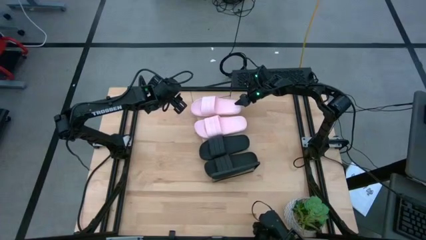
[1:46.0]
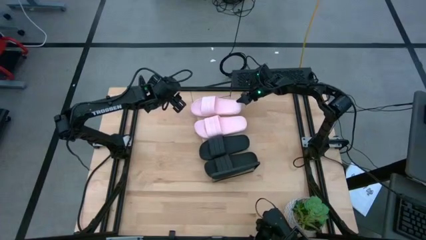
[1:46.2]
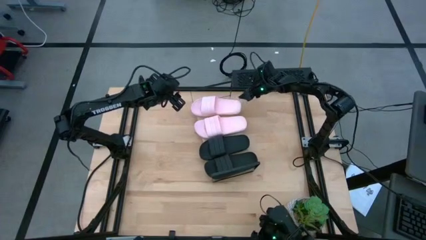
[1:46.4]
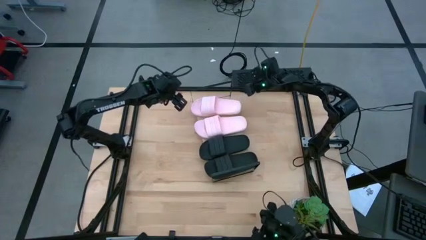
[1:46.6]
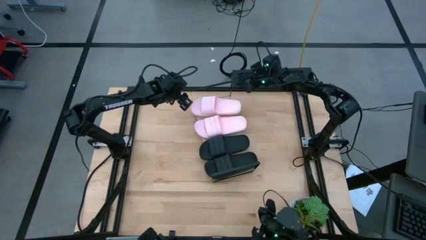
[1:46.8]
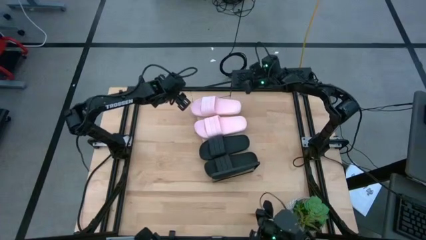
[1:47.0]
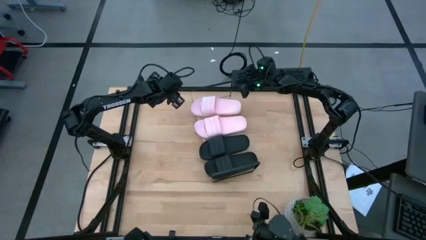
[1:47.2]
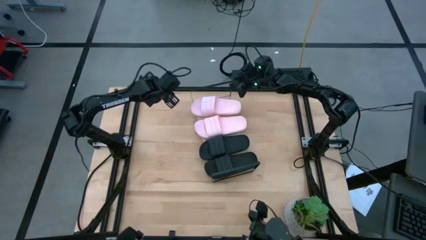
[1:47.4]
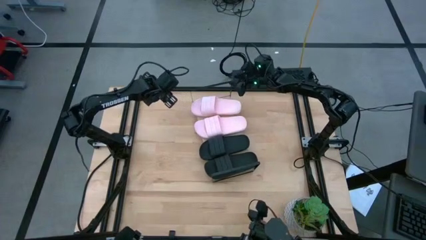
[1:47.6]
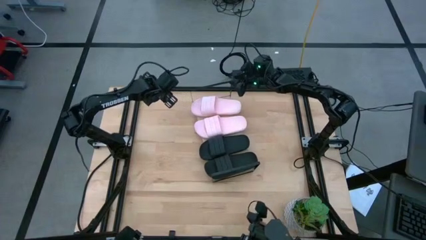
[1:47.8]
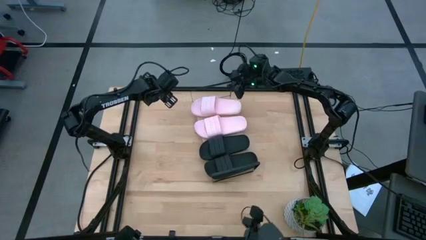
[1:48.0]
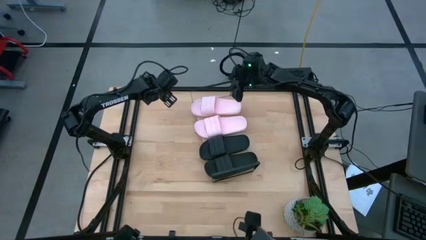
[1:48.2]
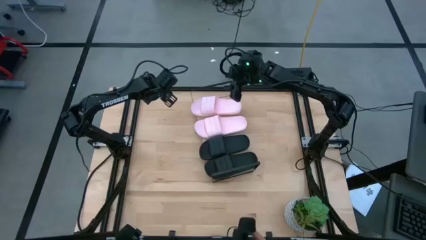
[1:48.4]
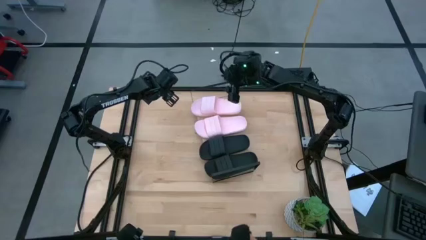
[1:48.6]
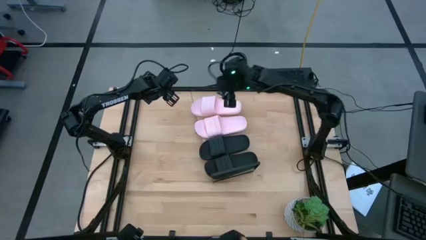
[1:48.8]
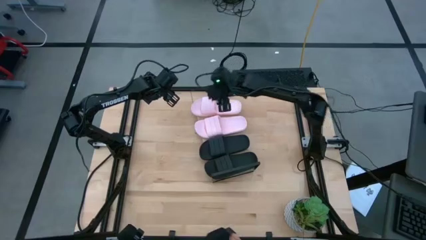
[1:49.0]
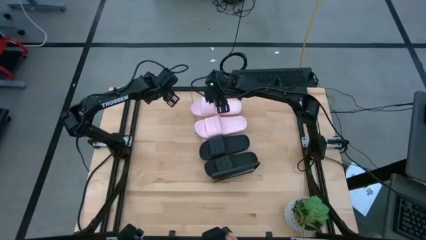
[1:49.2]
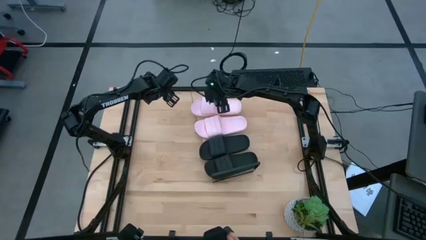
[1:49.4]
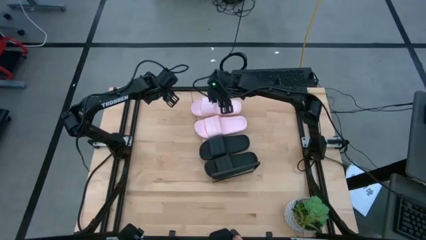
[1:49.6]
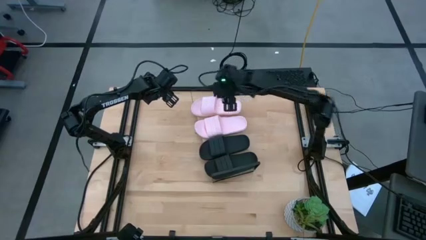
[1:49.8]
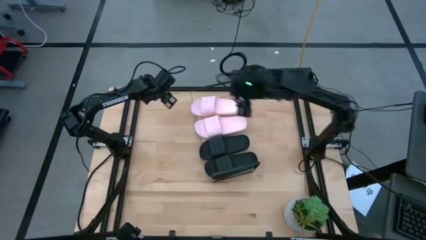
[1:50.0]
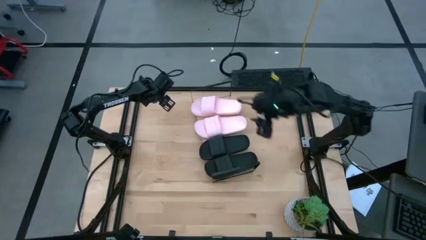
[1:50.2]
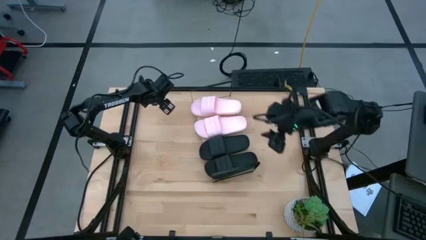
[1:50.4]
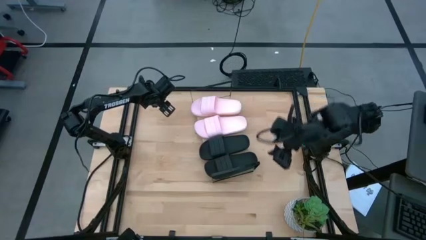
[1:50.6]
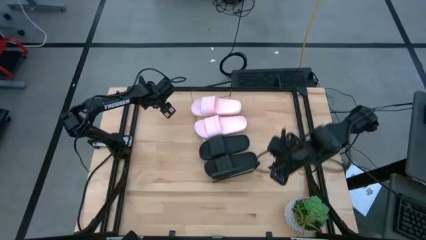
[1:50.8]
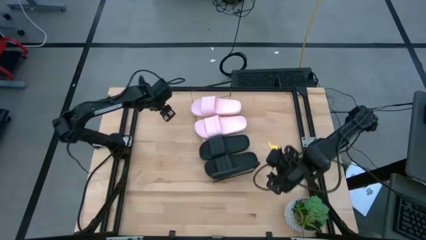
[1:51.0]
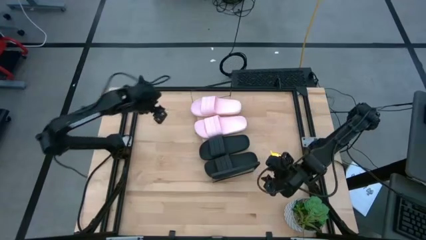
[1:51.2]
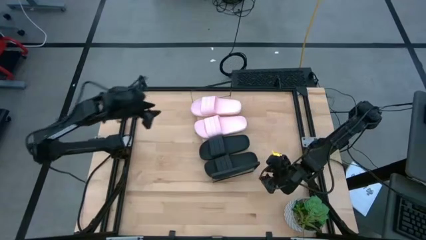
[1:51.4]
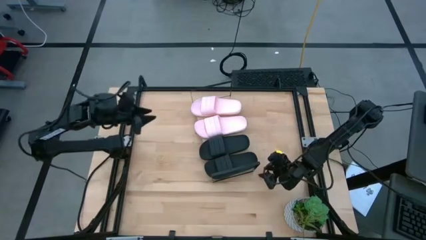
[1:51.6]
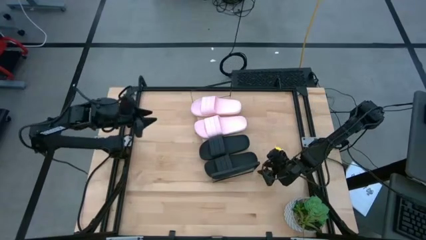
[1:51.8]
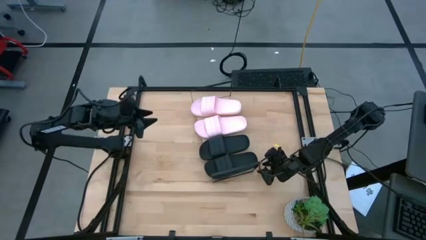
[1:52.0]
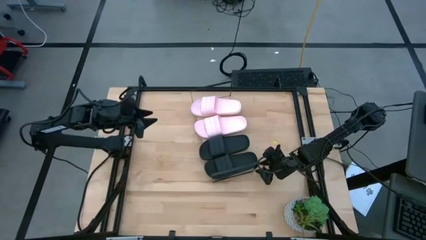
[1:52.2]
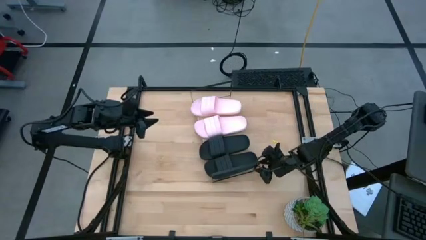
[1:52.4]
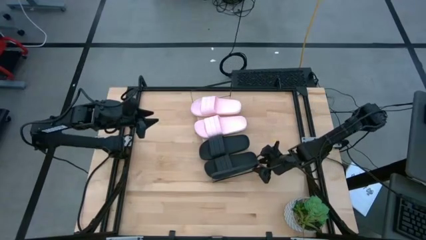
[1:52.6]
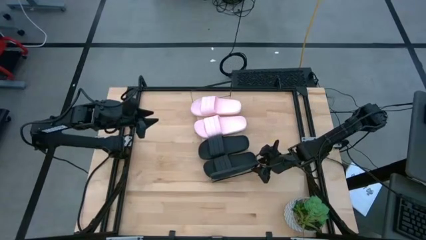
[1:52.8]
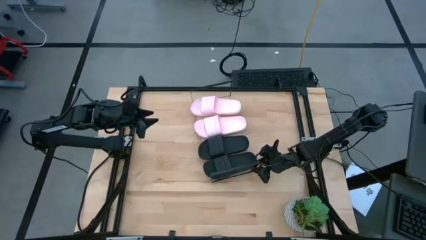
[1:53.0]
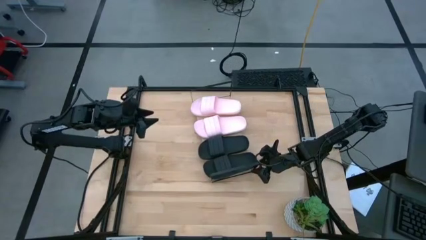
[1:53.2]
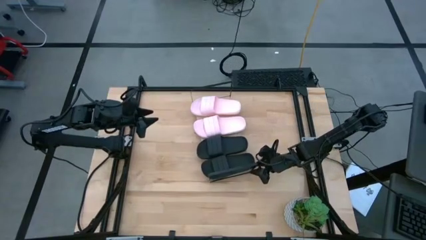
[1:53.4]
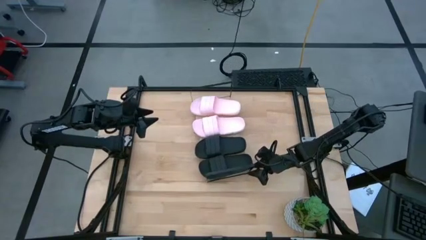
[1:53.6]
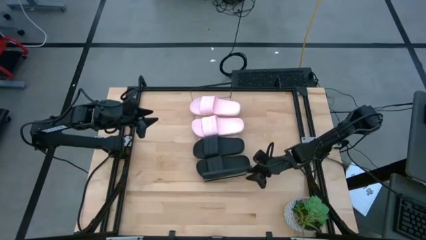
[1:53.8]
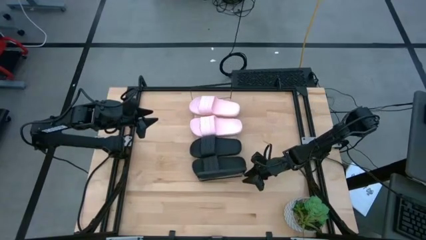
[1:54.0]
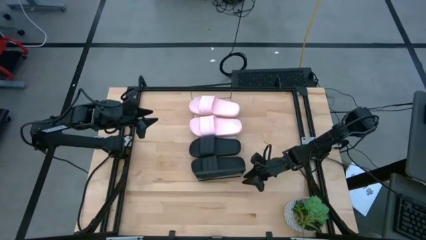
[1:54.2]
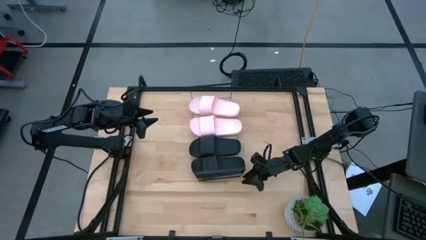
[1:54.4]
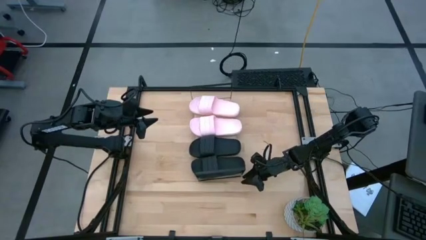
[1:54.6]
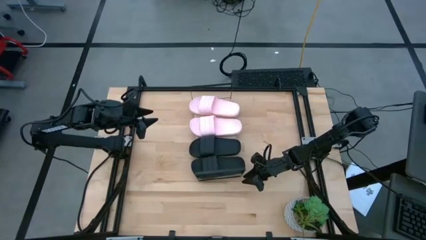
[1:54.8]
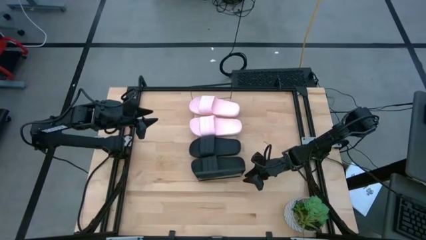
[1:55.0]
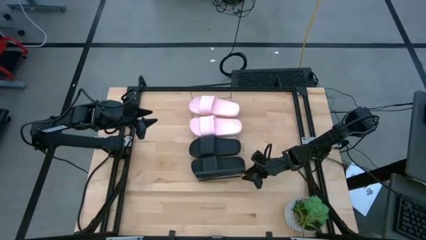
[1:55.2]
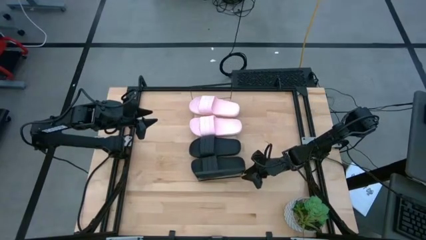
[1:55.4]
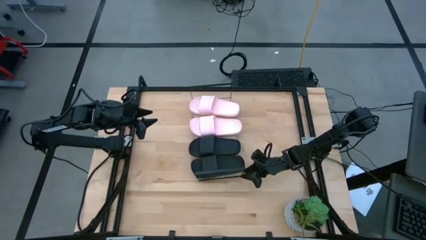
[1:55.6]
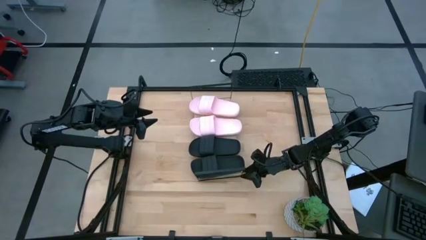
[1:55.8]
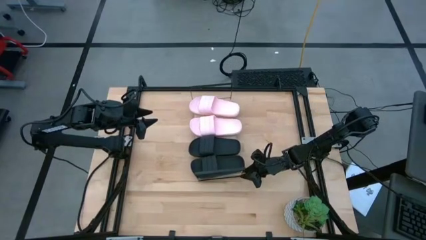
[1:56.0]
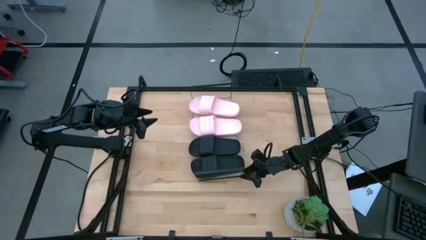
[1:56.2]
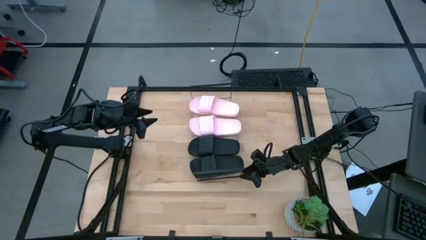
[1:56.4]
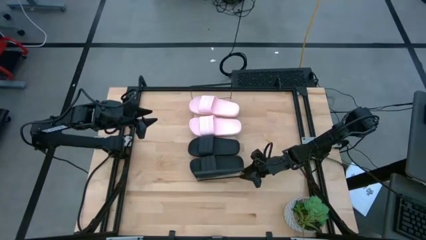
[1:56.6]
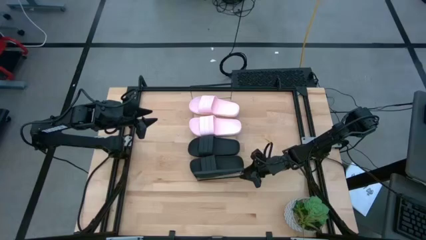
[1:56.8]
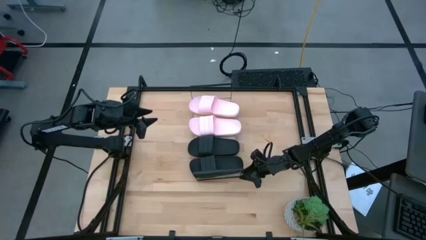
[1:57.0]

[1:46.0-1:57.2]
Task: Pick and place slides into the shelf
Adjust the shelf

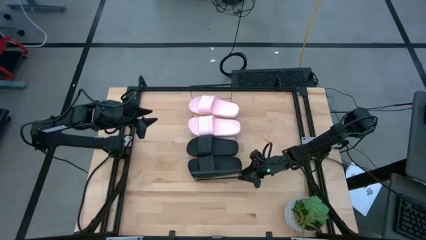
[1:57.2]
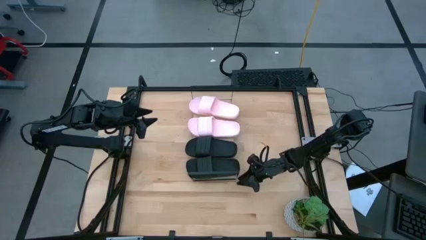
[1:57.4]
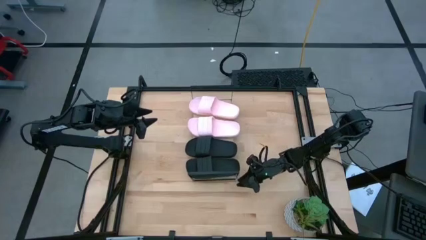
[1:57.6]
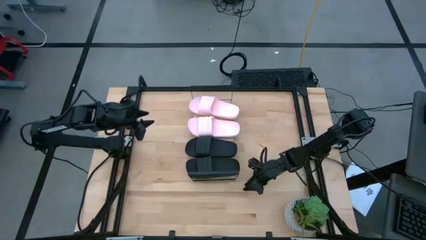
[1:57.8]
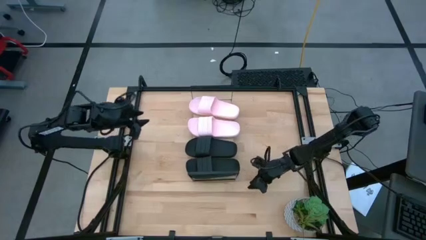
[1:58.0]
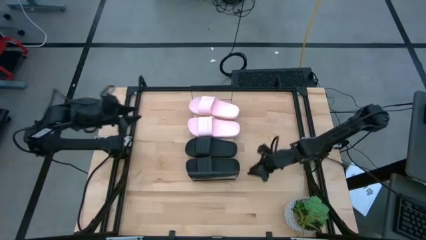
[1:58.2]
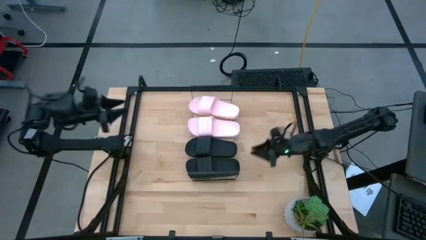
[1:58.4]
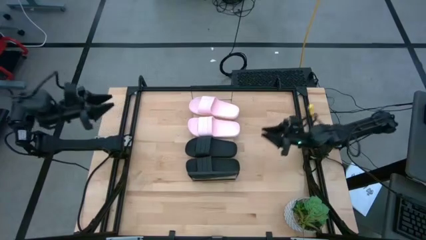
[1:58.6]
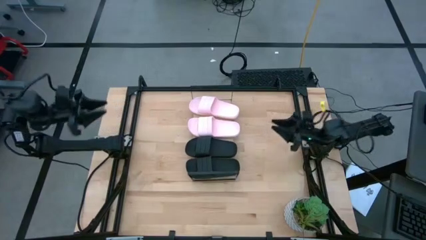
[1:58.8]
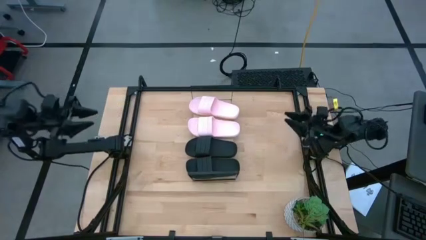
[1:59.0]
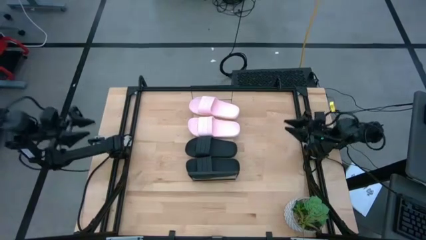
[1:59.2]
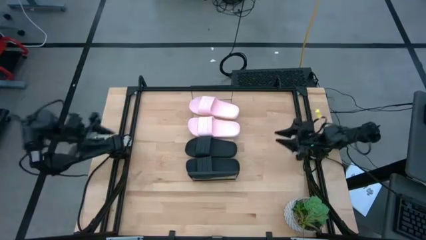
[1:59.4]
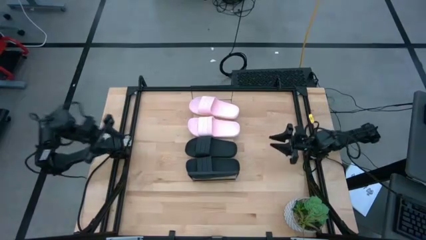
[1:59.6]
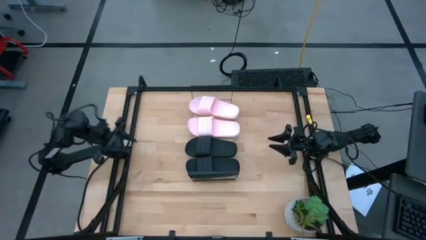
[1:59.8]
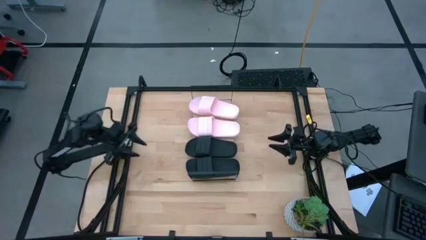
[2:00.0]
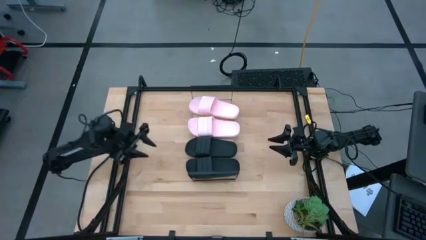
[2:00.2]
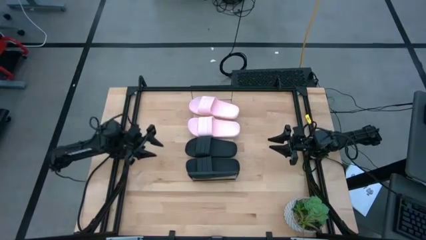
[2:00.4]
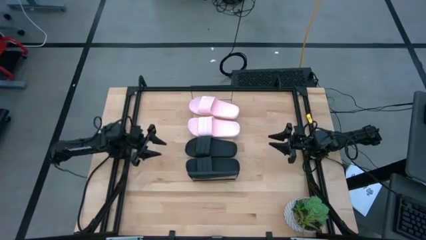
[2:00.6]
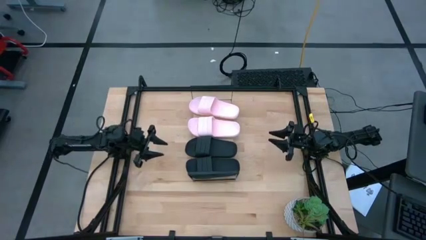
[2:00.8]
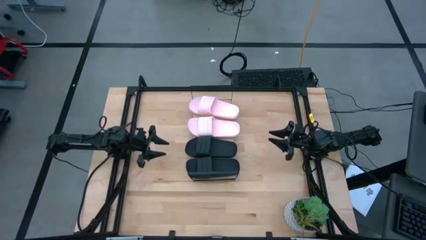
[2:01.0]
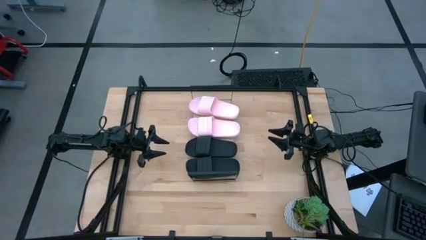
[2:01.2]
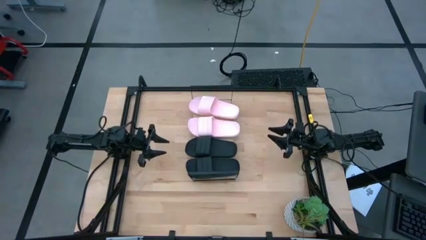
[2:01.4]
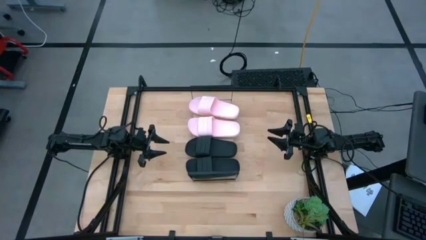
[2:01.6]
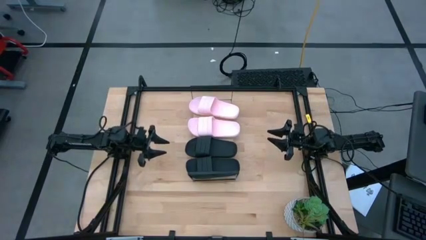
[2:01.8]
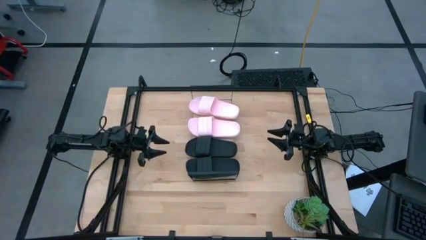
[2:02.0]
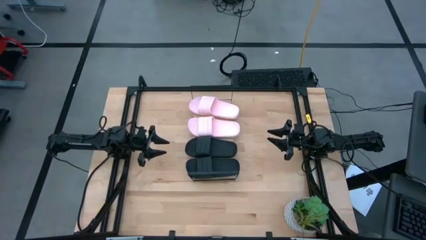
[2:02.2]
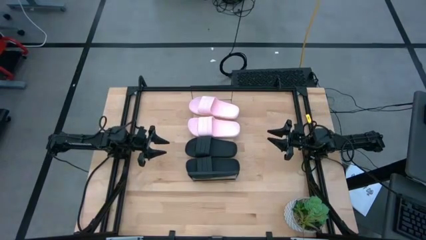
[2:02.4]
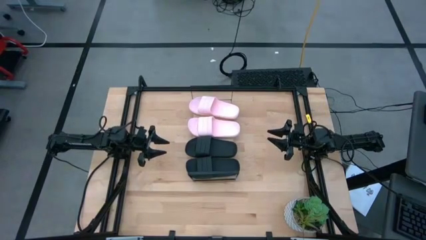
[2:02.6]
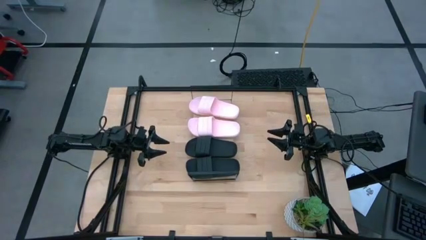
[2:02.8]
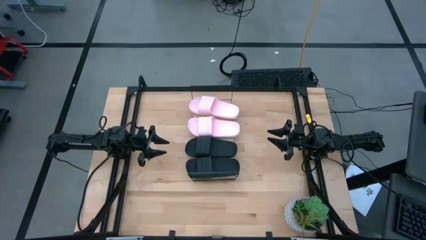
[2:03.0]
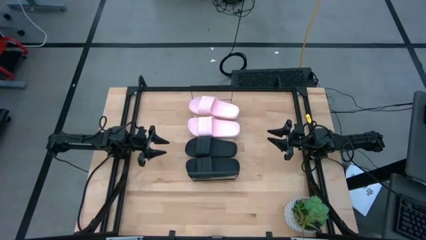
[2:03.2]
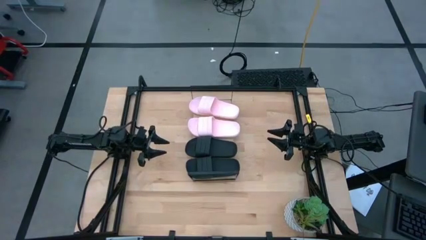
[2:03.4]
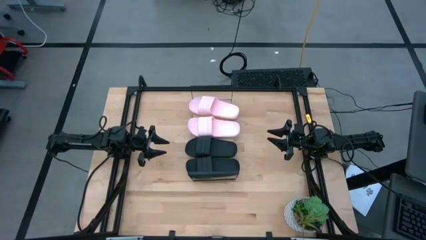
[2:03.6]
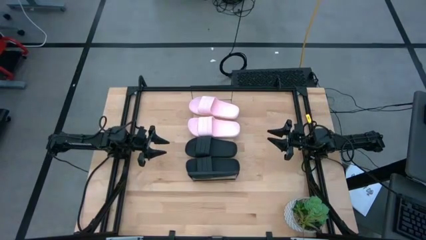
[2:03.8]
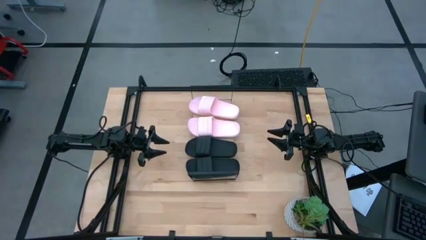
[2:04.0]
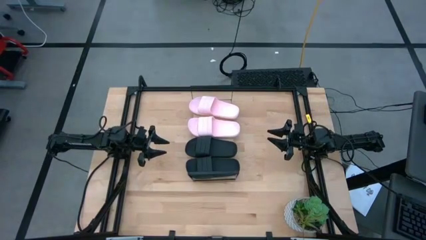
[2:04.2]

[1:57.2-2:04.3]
Return to Home Position
